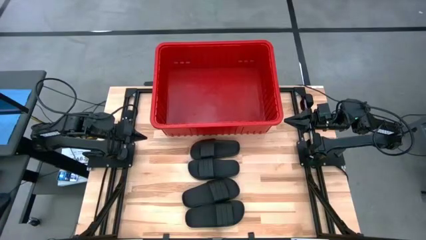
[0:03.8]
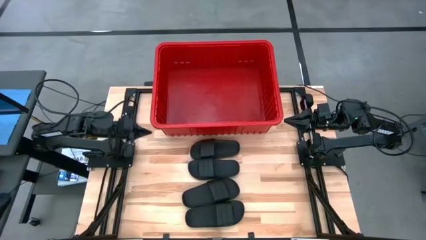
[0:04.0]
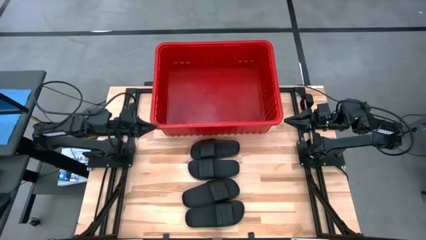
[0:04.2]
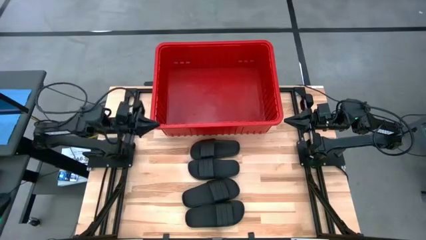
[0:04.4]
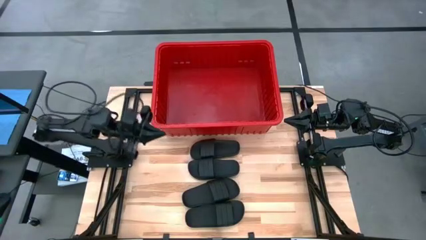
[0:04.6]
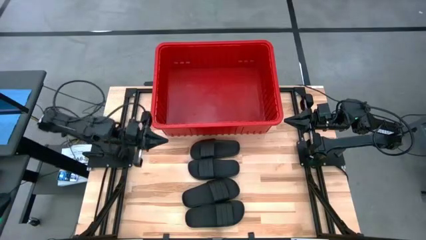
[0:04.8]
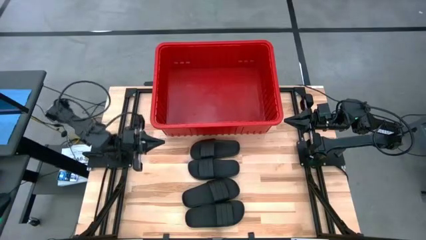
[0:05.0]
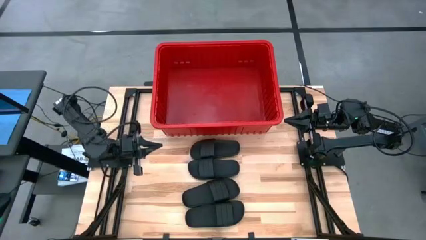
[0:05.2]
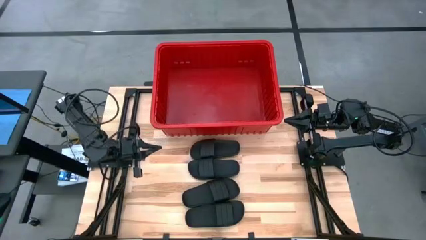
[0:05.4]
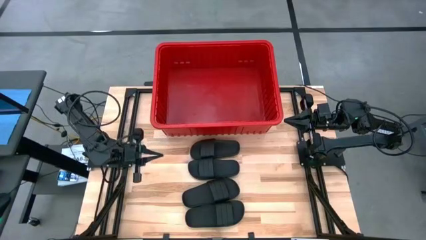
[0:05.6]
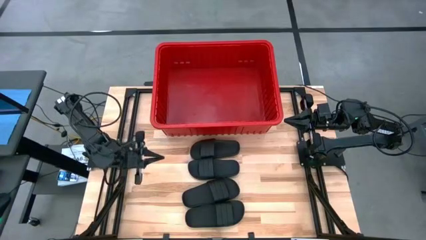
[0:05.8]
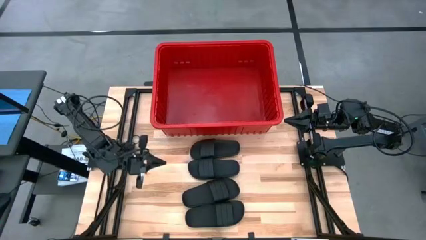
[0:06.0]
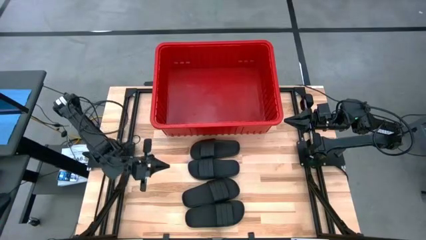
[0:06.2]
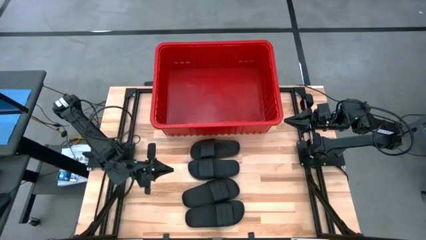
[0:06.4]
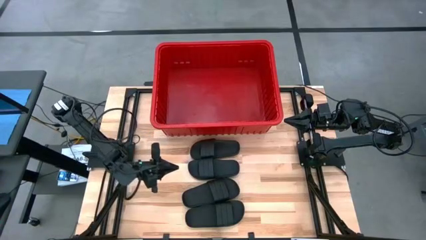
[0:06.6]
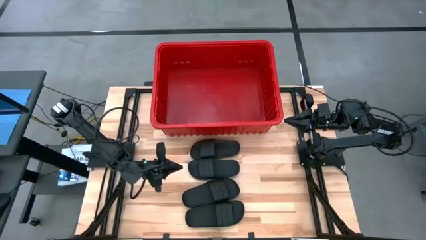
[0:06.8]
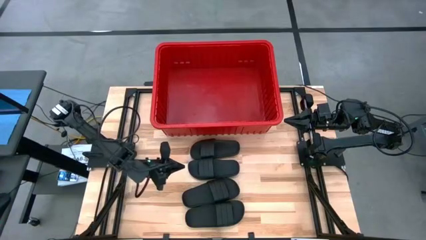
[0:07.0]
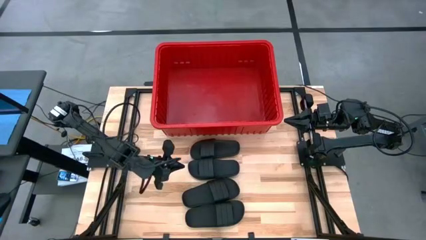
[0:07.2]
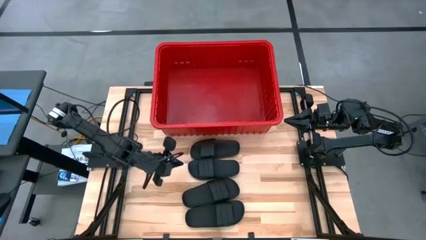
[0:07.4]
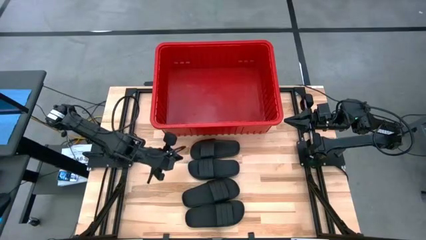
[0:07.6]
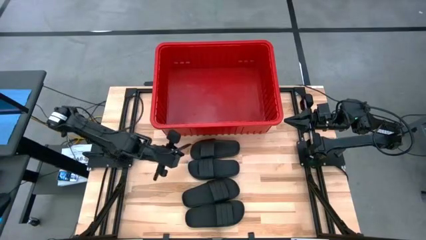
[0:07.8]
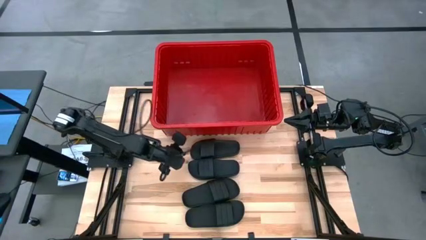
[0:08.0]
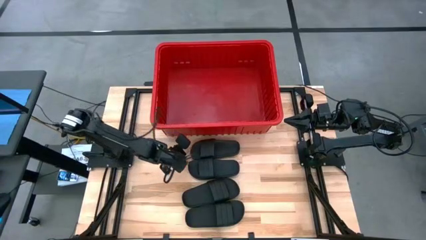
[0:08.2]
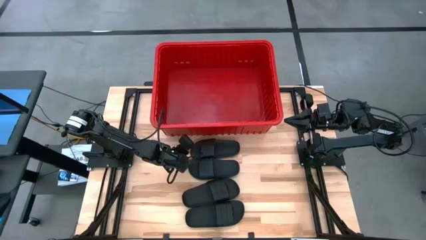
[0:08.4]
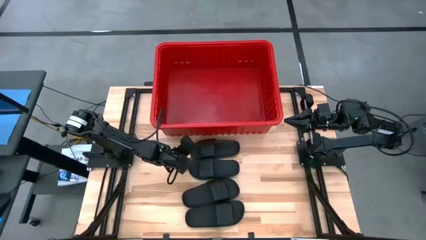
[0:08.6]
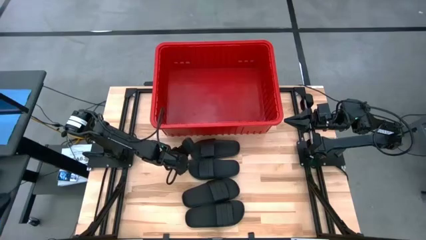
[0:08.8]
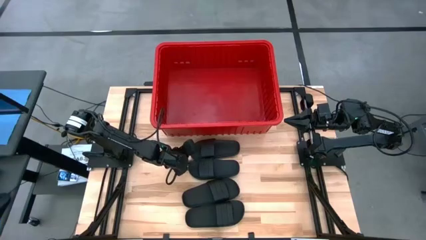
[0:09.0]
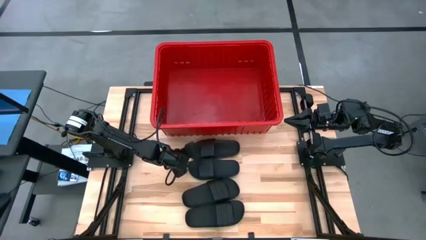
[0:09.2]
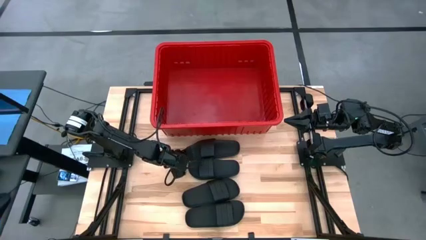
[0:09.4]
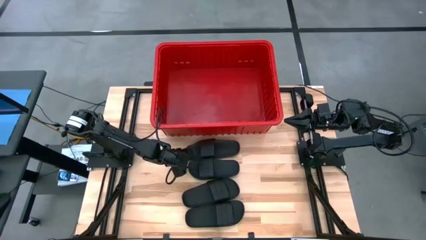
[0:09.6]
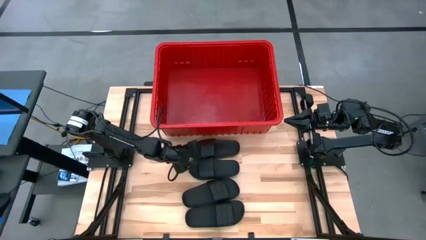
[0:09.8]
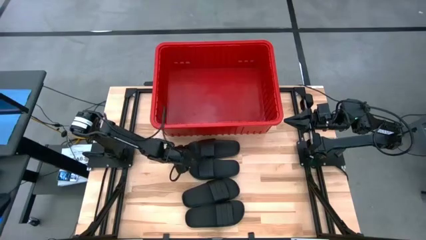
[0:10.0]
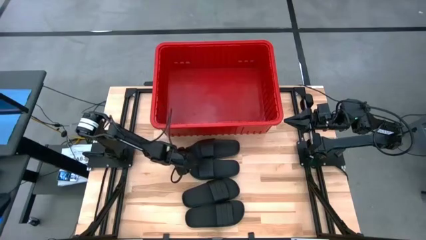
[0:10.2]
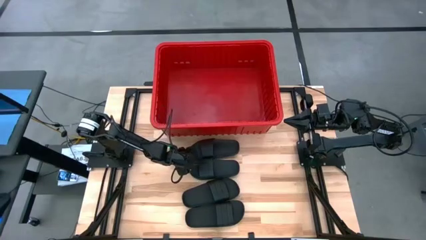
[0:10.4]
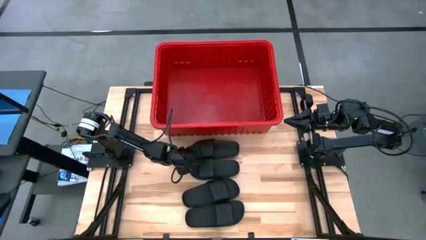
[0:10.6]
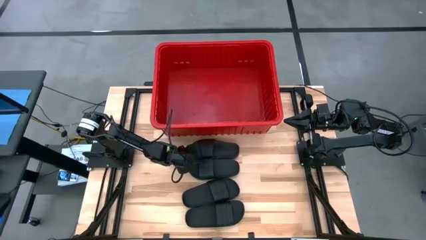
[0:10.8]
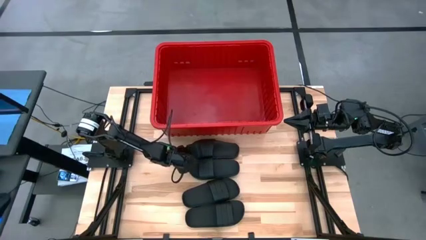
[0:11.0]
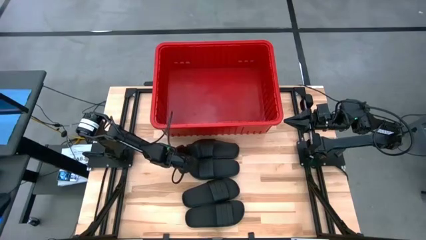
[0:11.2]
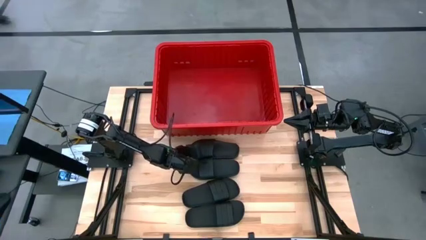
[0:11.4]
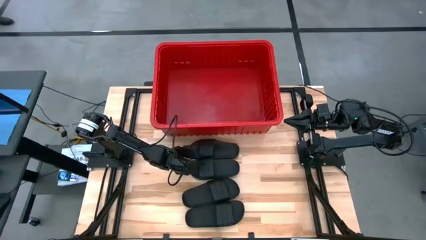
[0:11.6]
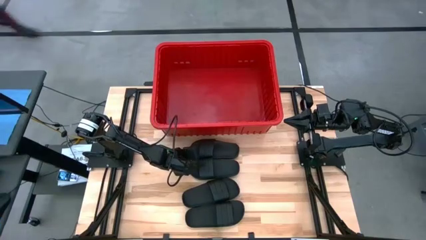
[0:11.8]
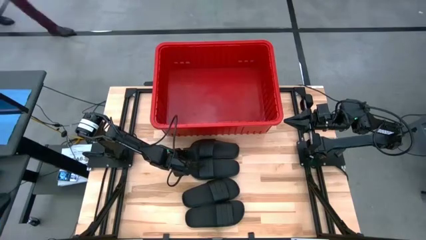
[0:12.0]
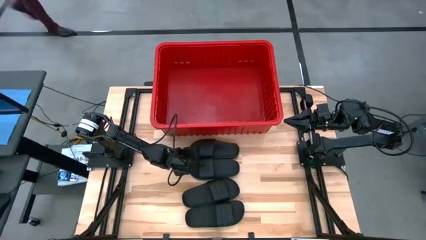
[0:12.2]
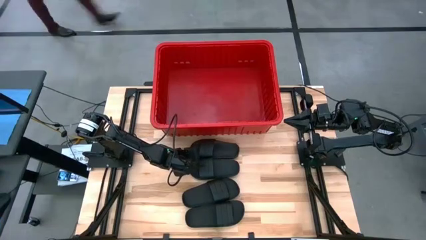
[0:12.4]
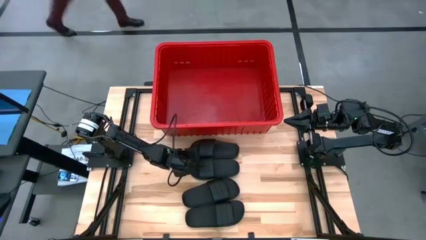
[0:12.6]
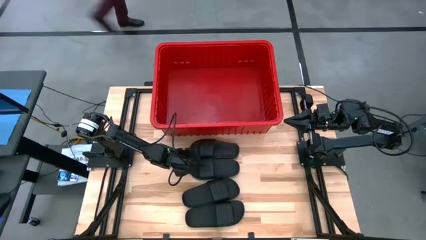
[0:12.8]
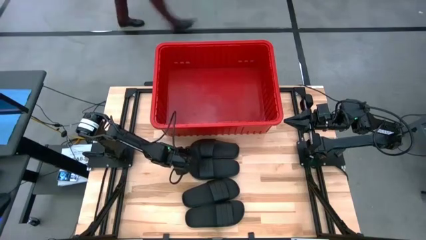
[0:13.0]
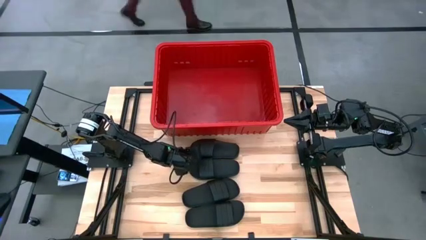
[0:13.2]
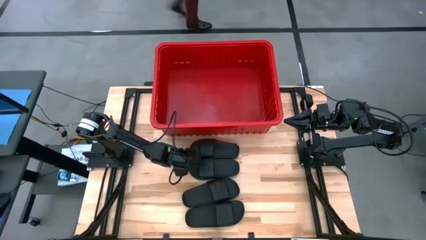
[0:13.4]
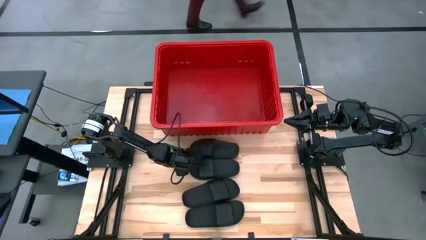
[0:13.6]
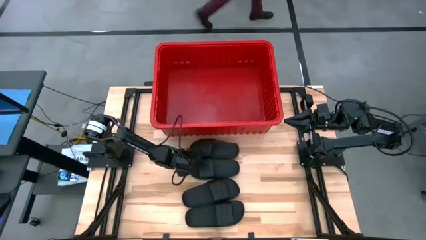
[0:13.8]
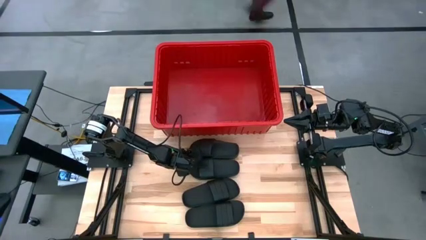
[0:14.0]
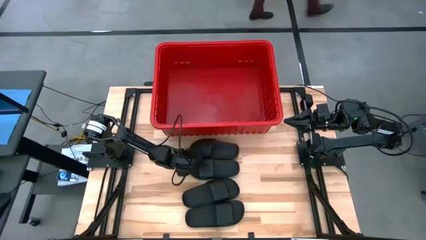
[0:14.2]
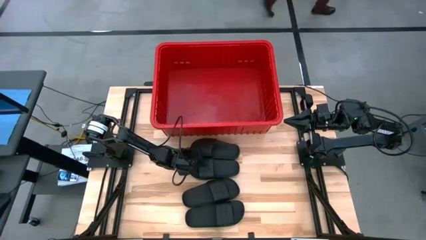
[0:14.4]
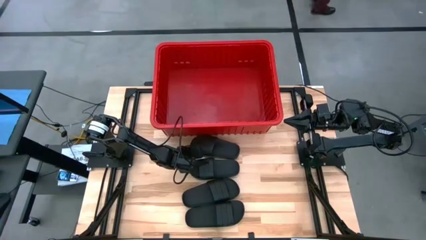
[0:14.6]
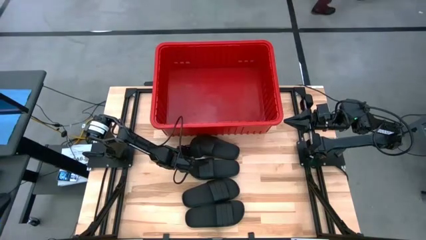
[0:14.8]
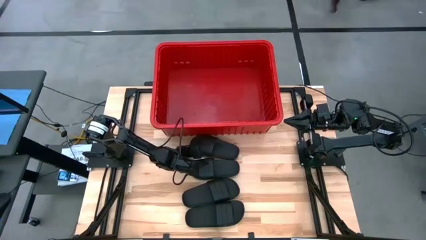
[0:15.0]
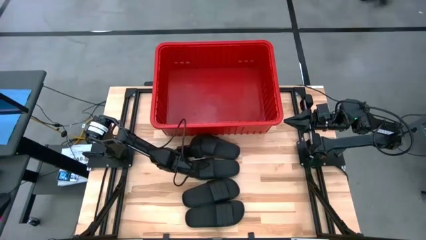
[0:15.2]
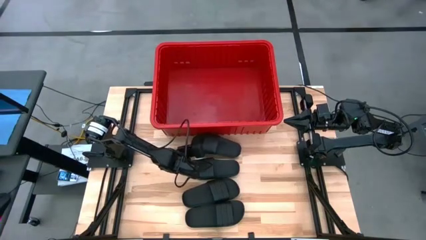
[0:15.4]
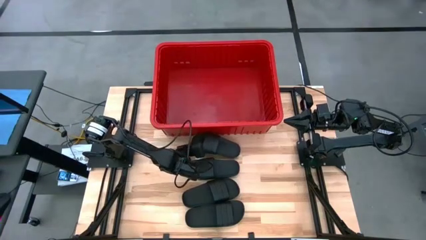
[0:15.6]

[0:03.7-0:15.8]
Task: Pick and place slides into bin
Put the black slide into the container
